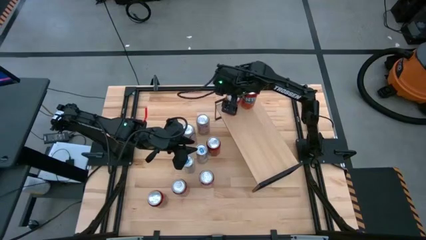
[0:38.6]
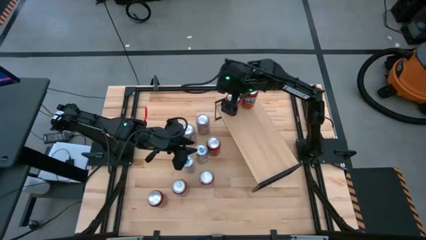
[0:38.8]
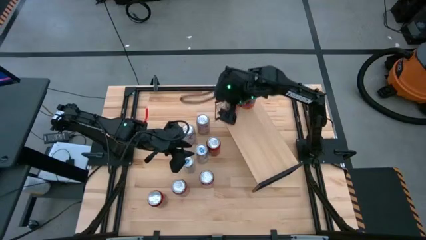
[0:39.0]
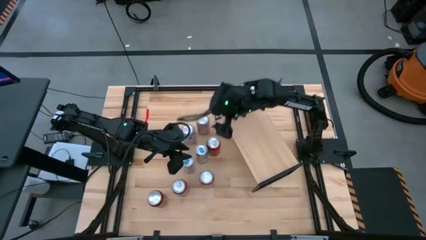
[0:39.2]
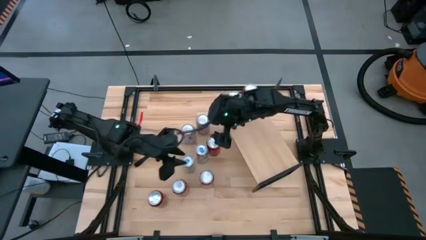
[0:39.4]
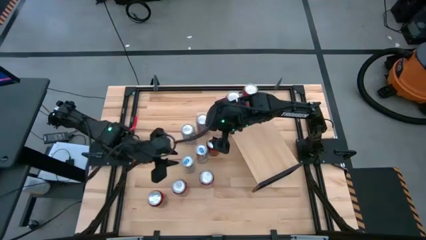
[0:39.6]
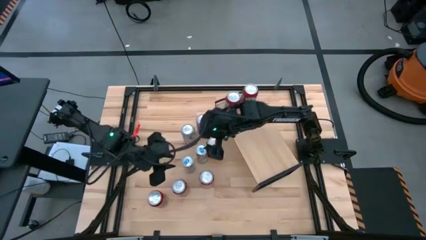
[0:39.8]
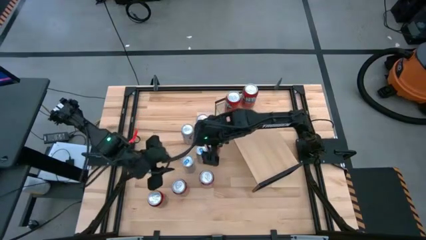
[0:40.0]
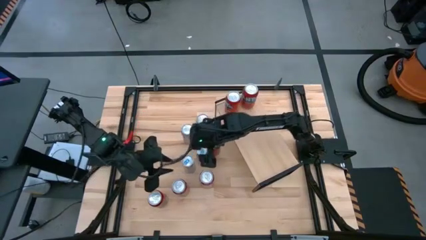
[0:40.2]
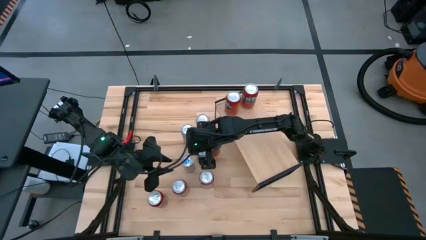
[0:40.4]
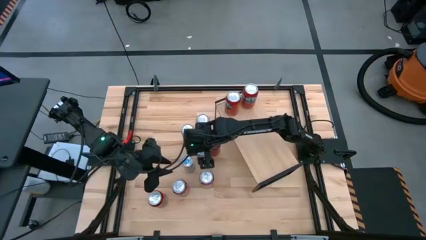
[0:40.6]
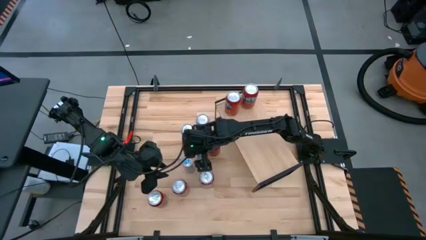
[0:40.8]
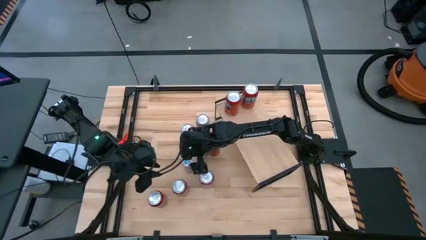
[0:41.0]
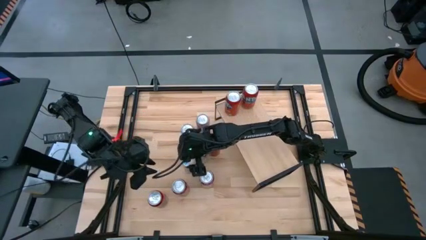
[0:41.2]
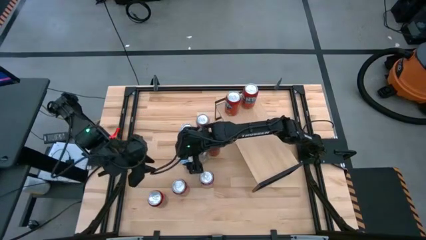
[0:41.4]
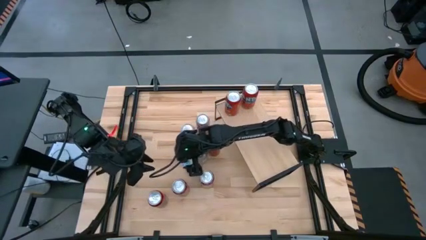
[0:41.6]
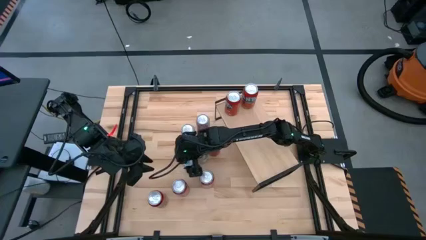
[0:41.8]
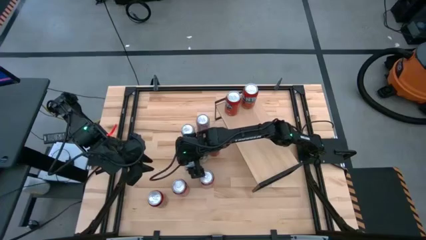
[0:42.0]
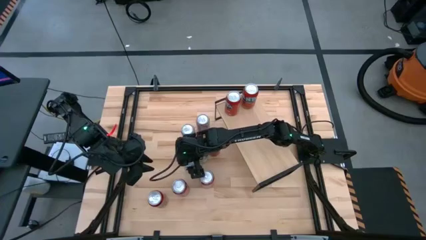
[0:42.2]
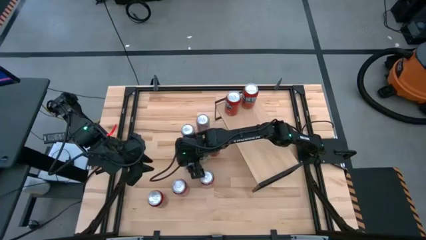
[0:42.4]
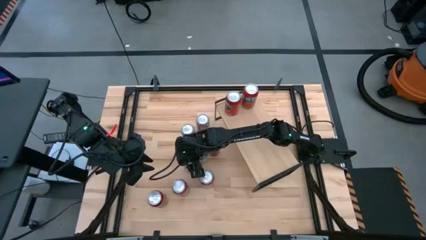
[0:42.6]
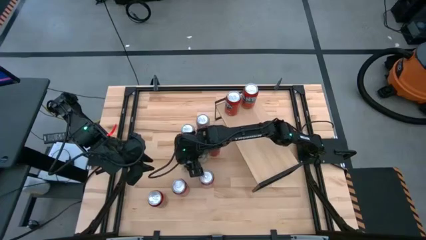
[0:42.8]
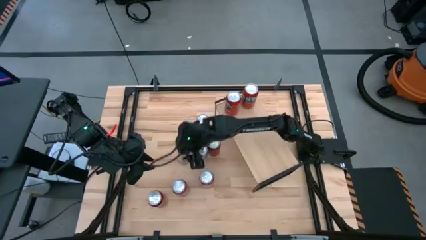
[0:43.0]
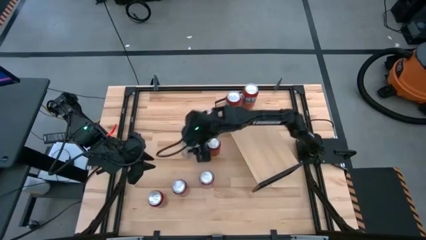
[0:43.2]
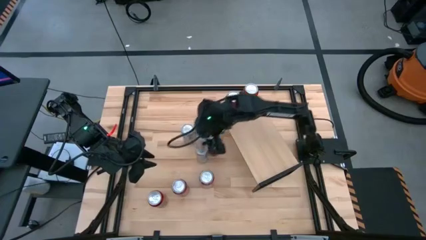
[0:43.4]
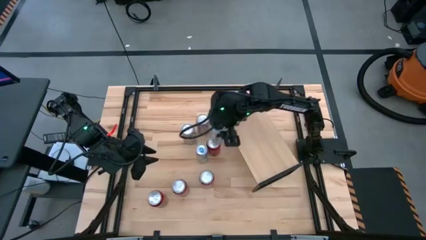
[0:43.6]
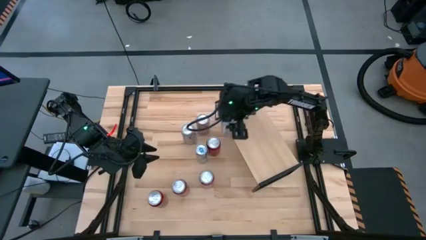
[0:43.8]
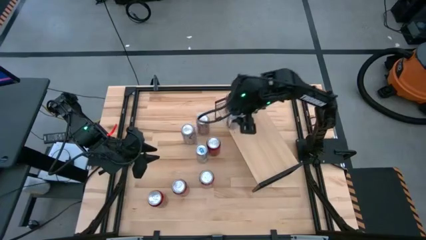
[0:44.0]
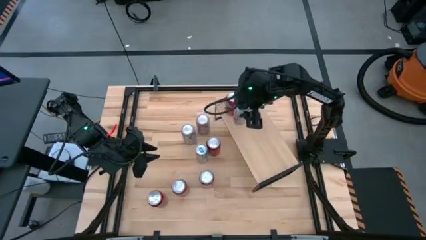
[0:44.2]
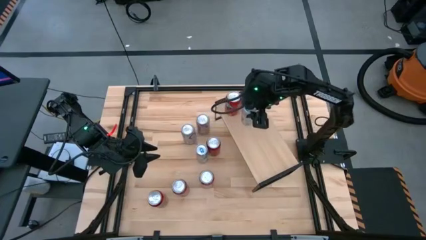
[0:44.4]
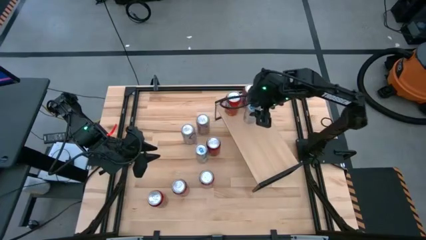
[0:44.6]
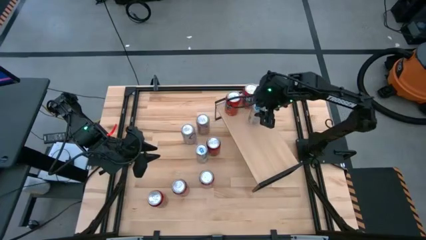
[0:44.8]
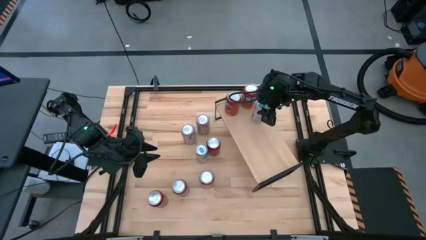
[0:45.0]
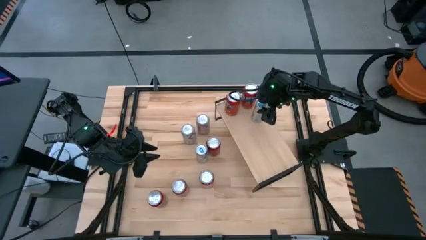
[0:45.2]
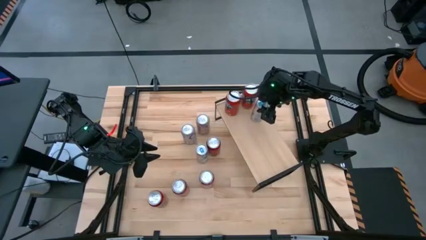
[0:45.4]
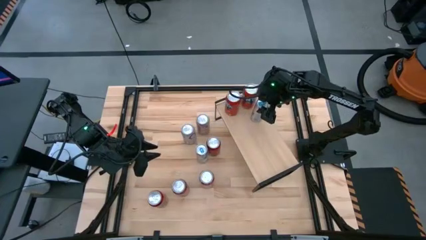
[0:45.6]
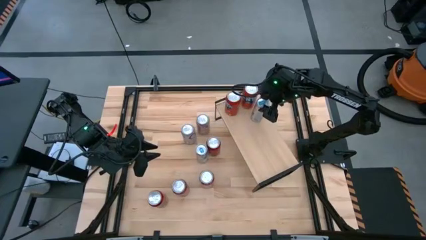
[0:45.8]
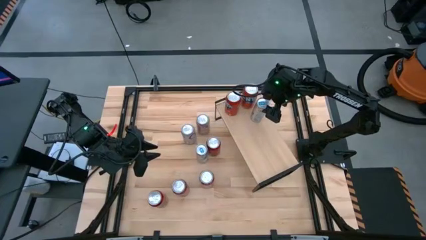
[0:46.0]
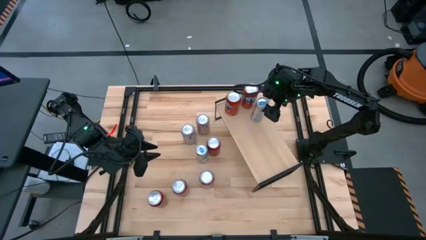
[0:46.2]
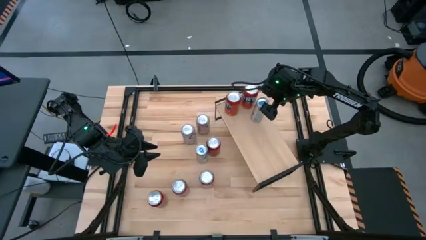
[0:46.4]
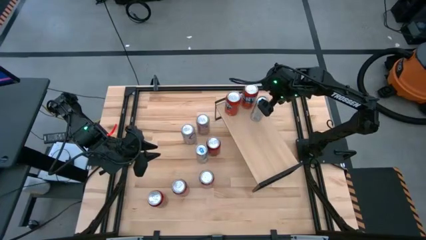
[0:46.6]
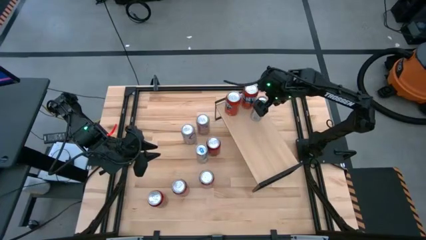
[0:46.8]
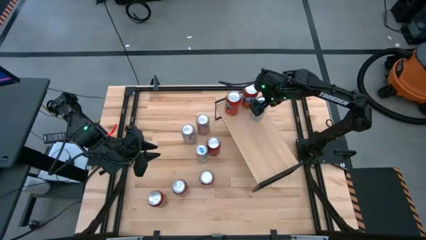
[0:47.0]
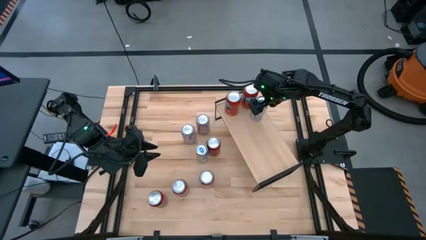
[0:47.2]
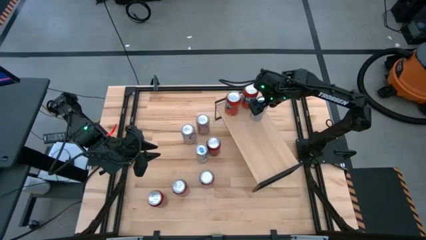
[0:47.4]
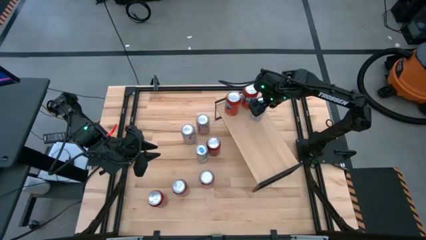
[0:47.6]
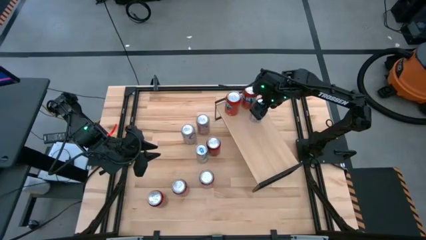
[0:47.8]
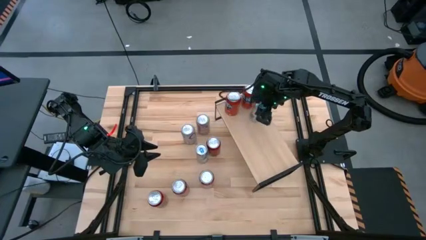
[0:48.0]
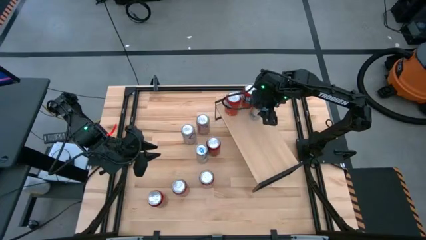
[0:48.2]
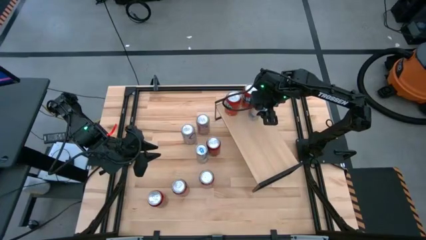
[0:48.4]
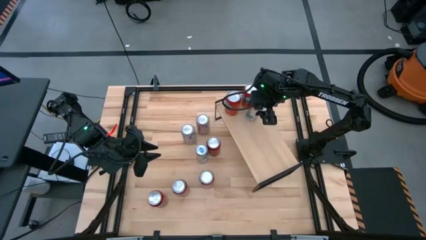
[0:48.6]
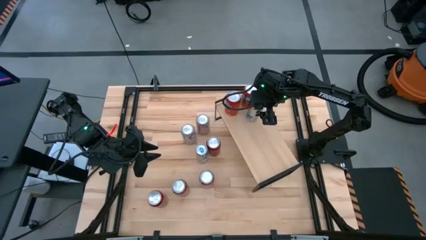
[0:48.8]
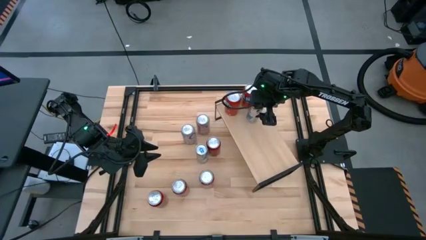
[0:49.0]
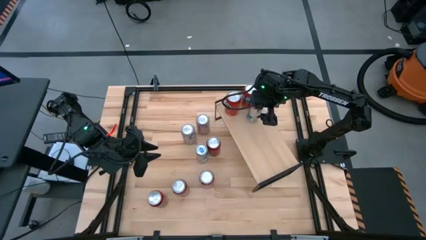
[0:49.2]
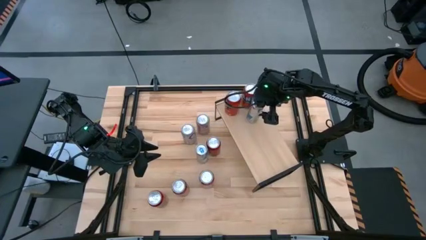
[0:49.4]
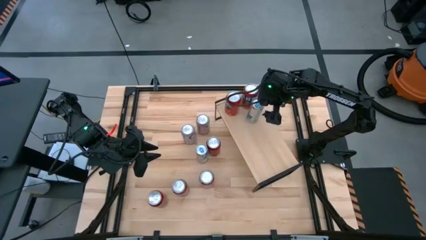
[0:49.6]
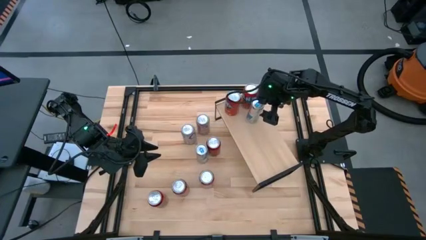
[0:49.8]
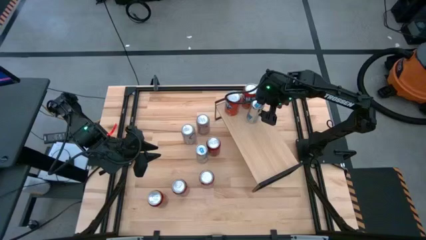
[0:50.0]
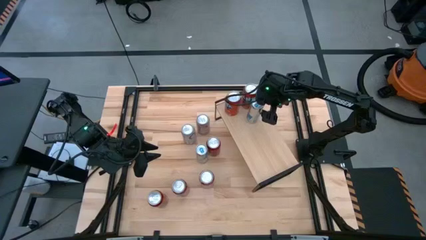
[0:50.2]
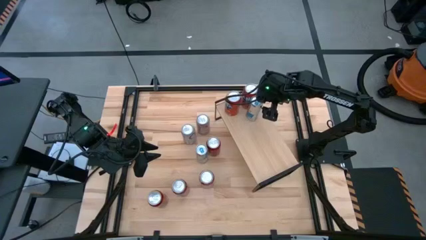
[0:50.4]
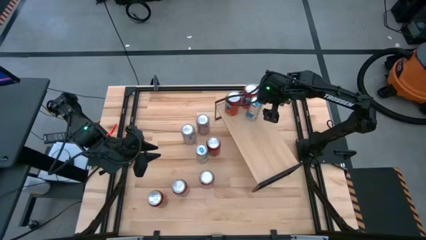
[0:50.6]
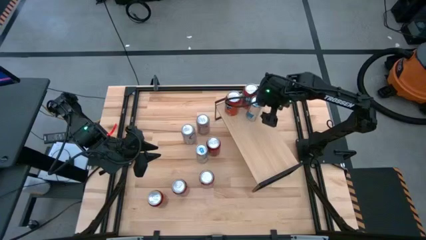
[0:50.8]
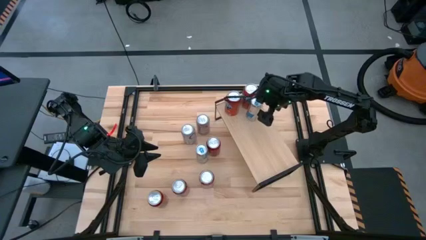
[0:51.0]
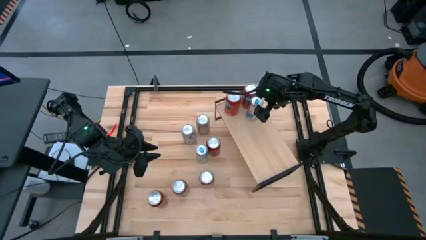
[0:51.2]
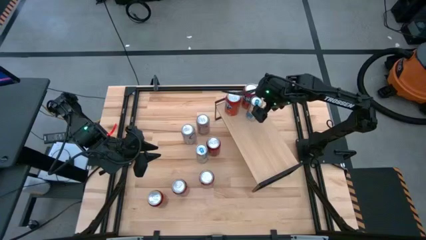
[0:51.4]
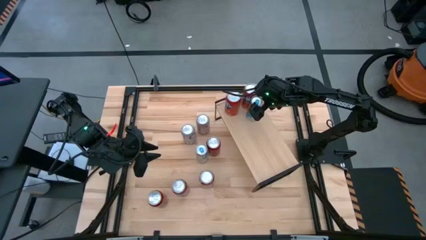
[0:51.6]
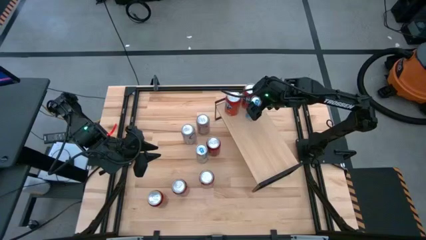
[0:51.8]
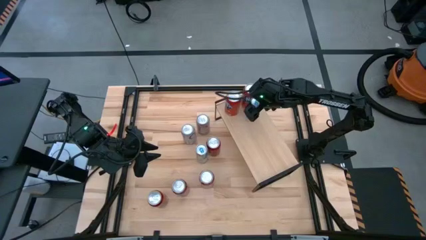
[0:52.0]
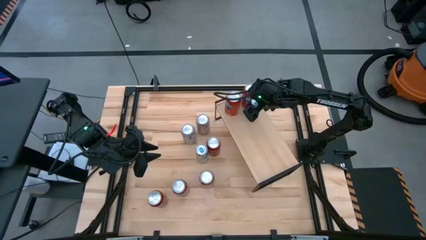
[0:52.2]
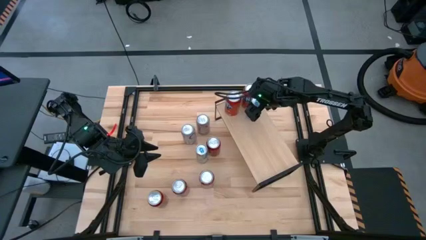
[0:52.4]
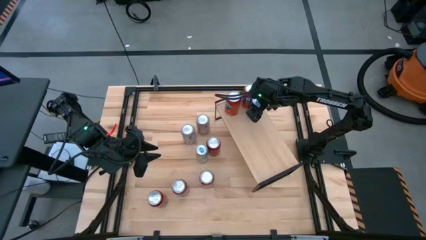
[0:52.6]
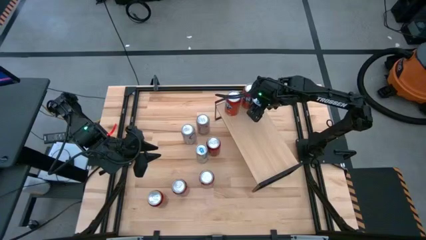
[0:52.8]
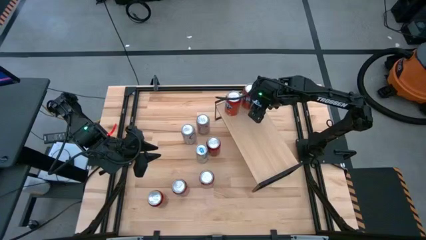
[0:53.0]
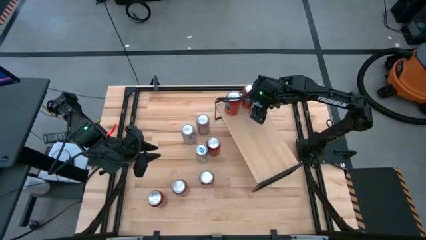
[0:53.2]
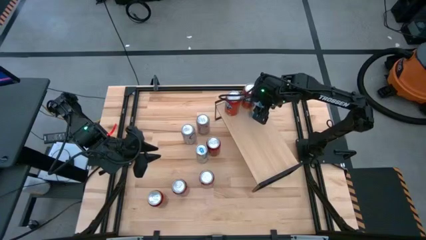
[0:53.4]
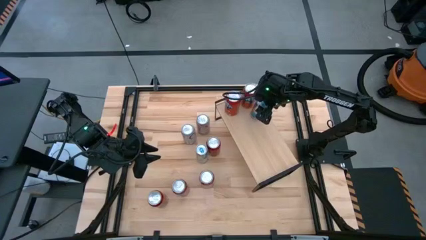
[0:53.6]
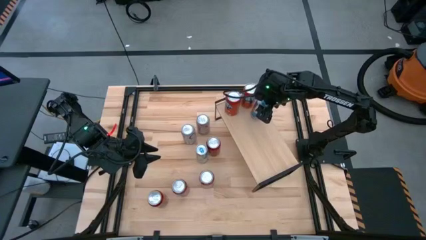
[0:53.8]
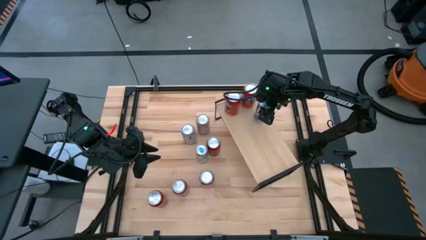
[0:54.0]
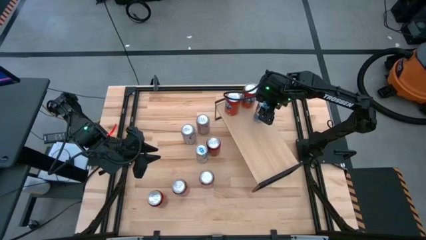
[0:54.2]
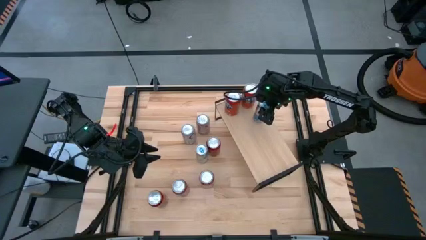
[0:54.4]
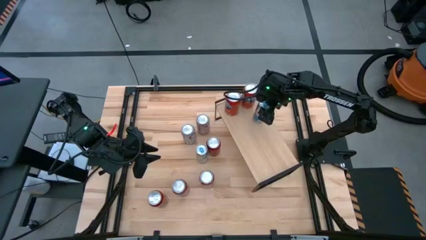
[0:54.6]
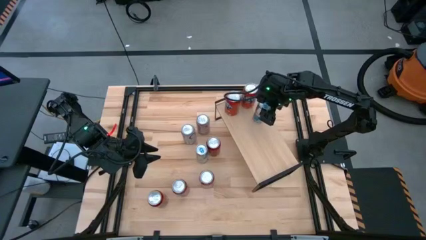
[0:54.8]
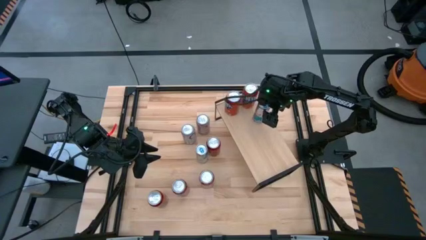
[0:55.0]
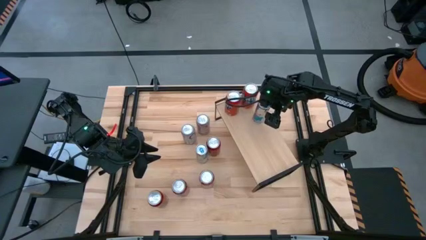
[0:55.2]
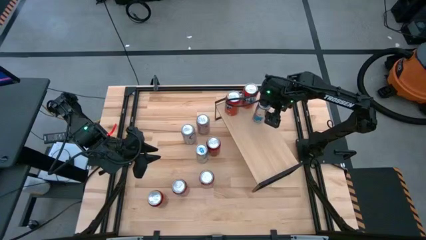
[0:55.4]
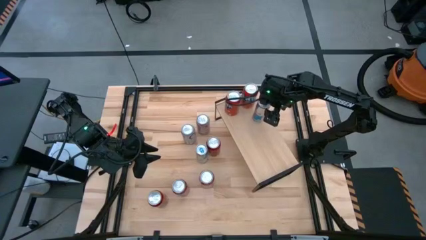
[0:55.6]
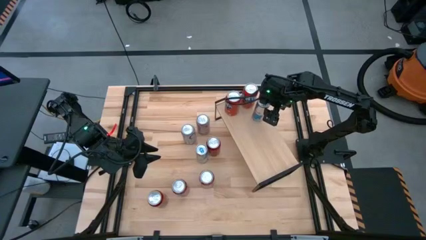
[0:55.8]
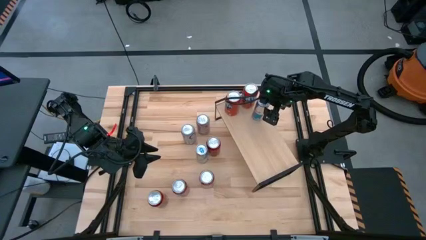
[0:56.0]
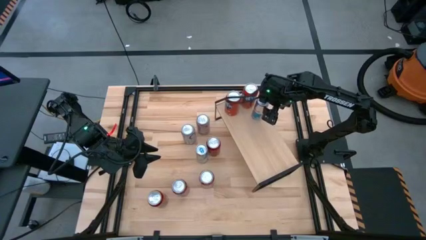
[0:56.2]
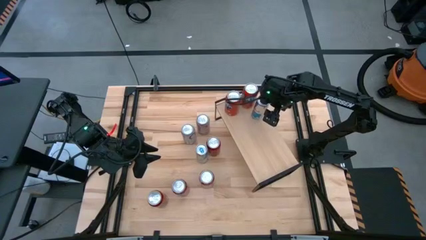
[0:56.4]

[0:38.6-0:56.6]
Task: Place canned beverage on shelf
Put the bottom blue soda can on the shelf
